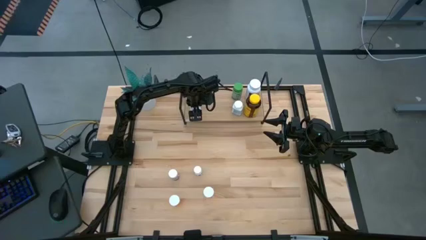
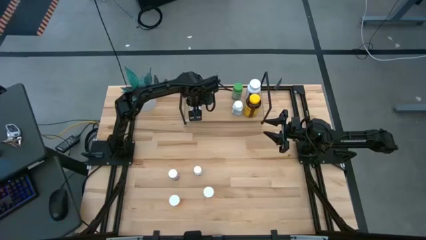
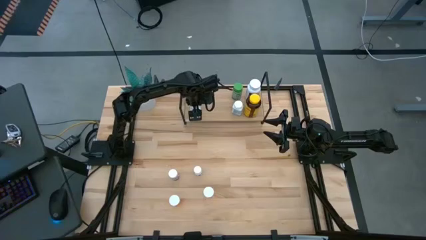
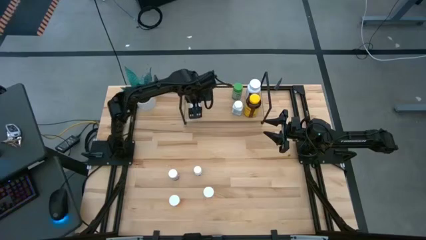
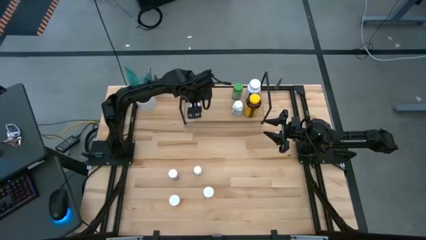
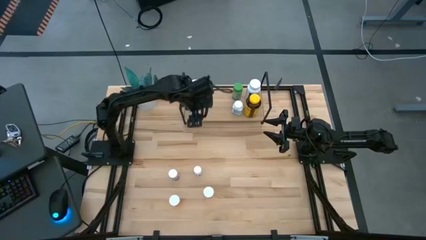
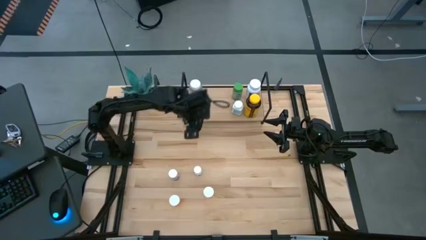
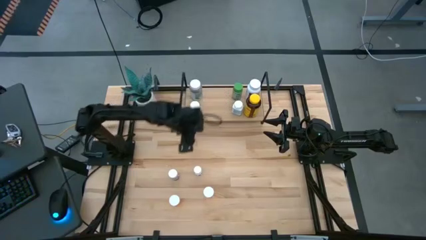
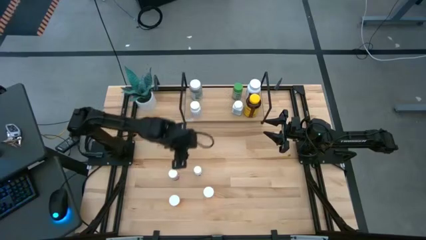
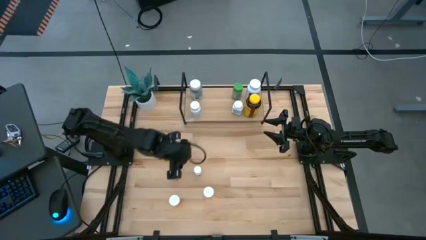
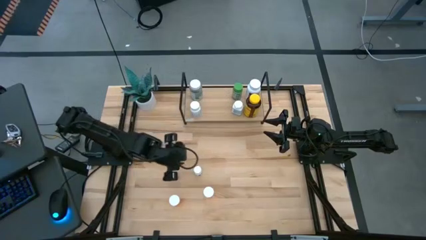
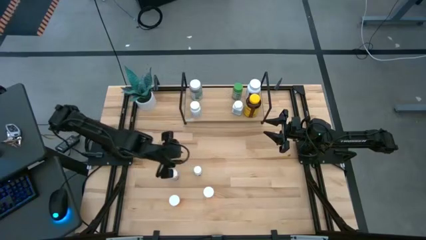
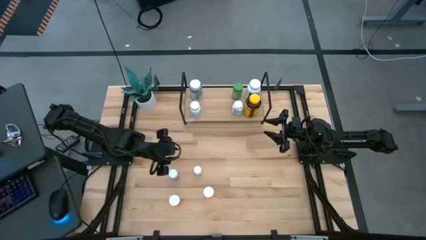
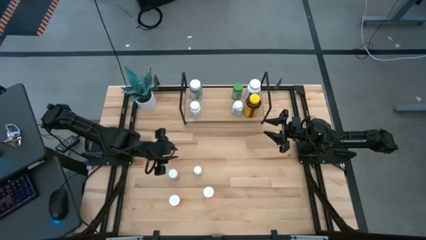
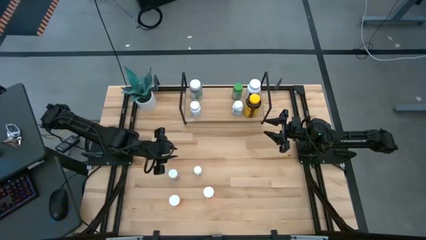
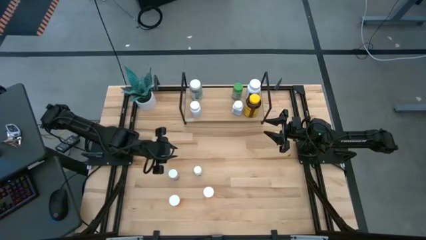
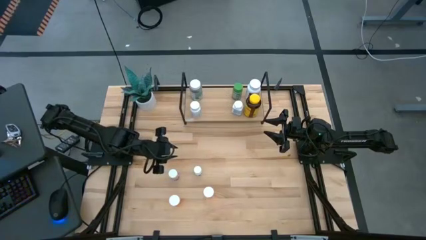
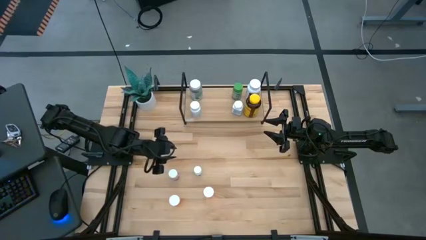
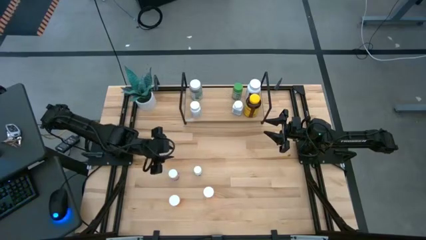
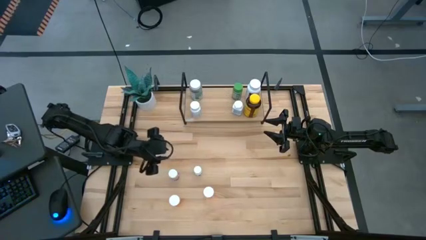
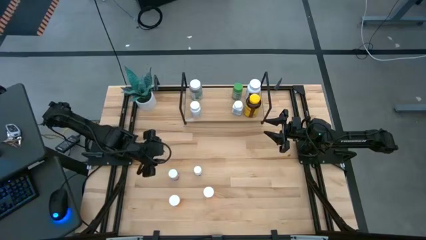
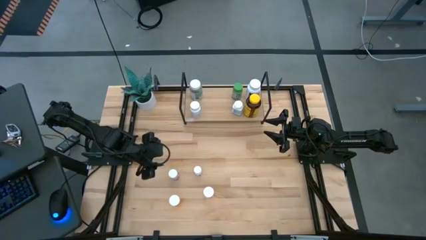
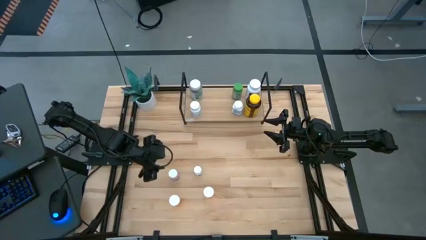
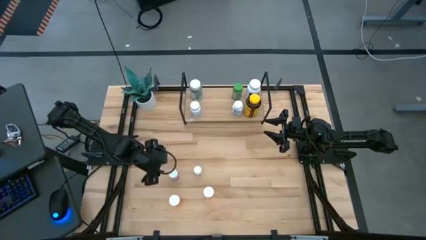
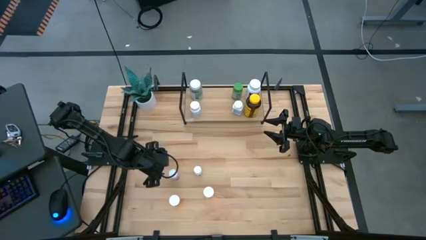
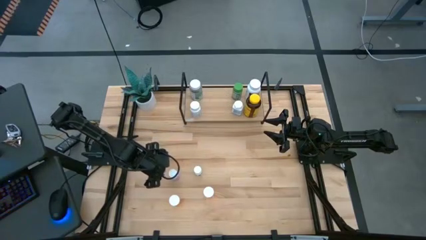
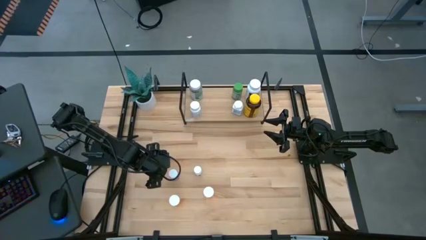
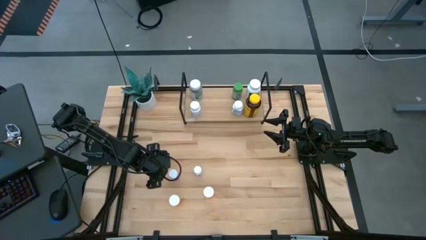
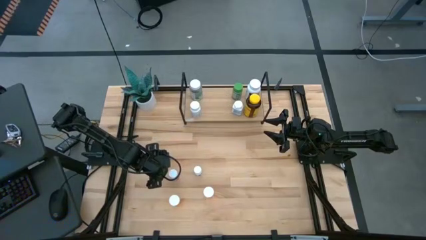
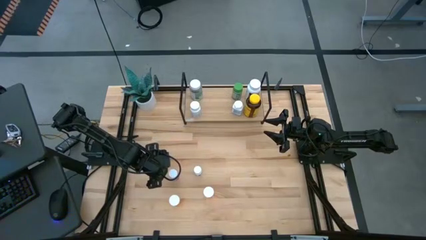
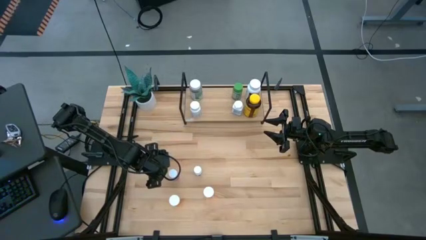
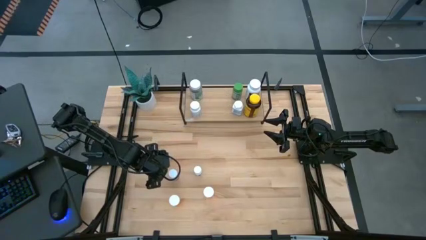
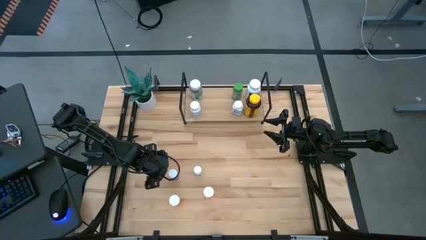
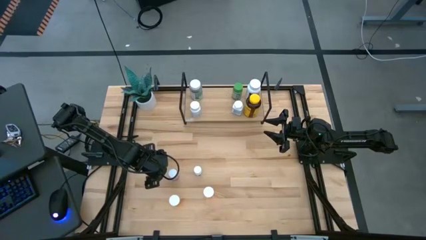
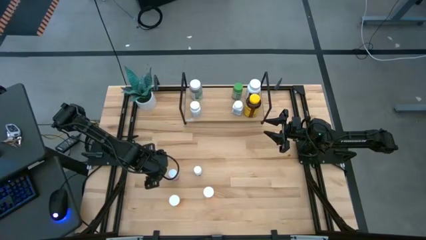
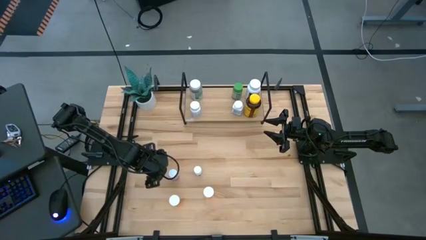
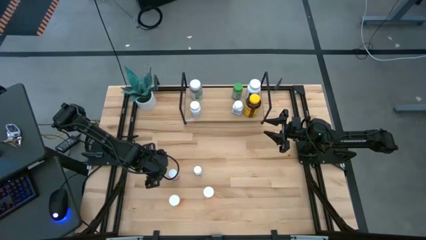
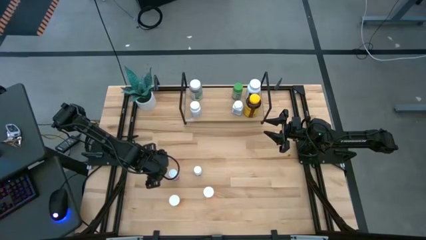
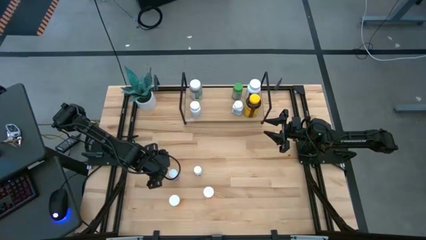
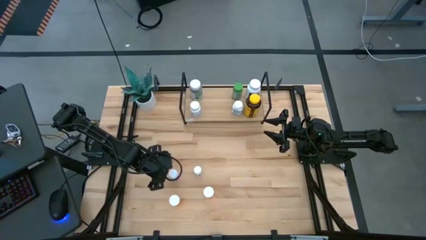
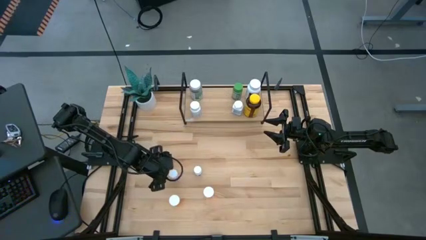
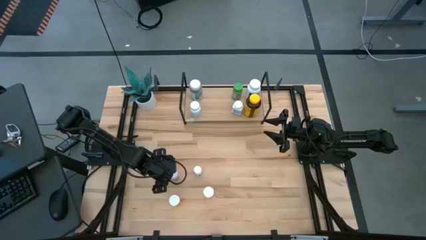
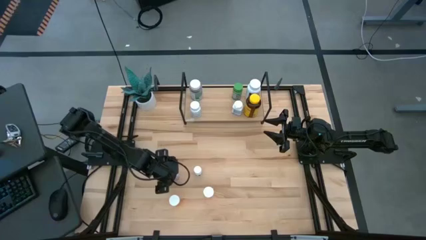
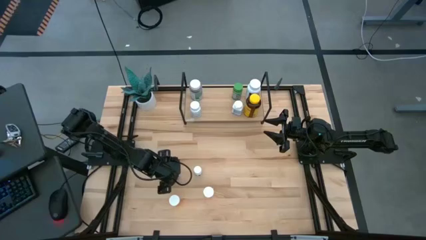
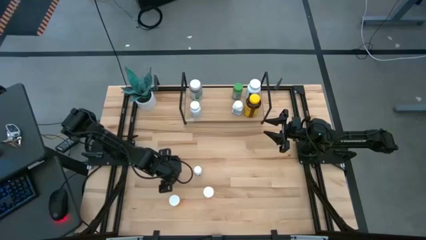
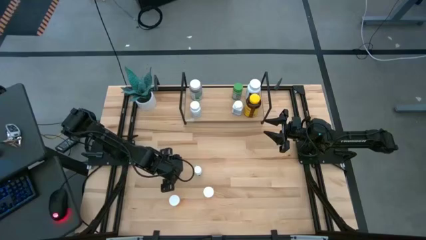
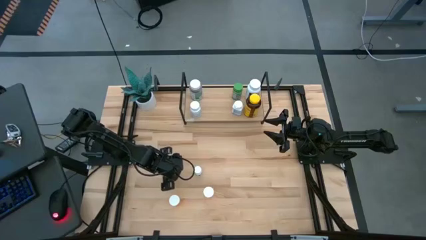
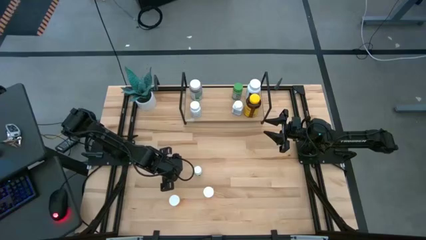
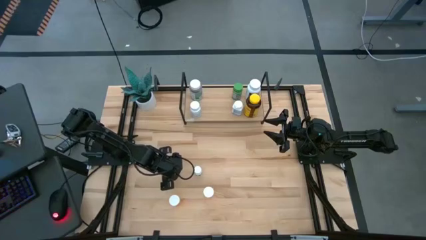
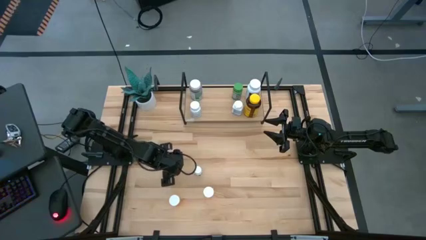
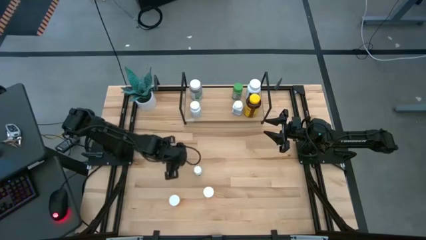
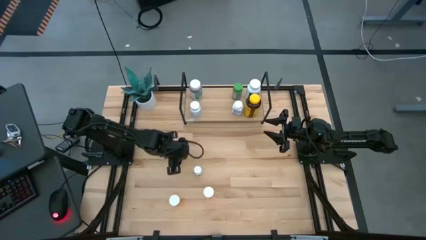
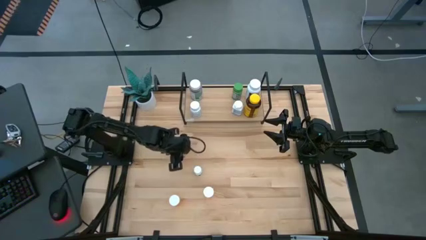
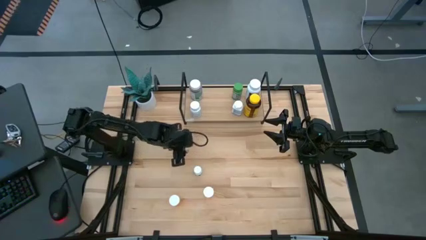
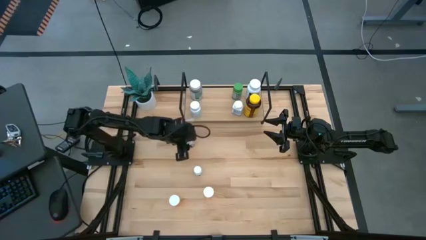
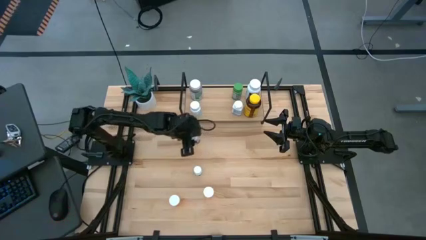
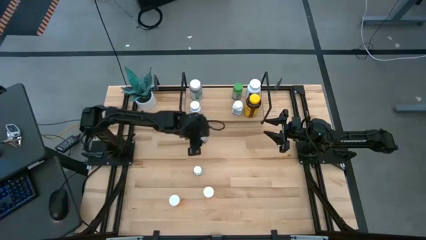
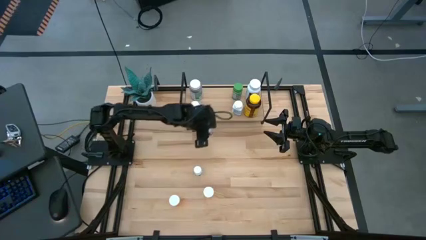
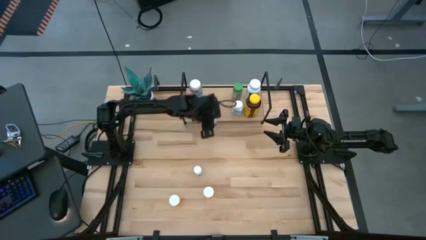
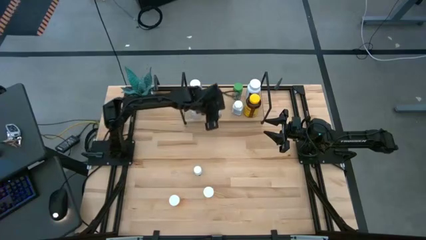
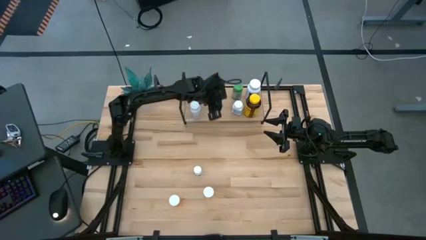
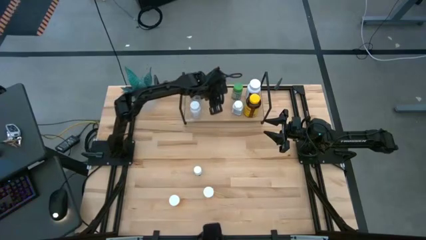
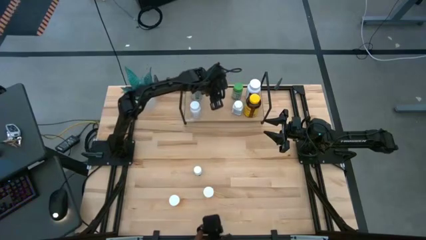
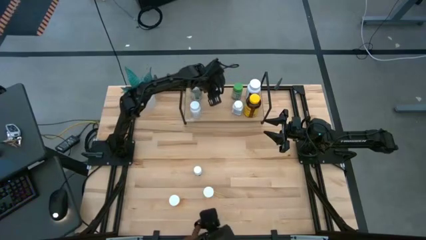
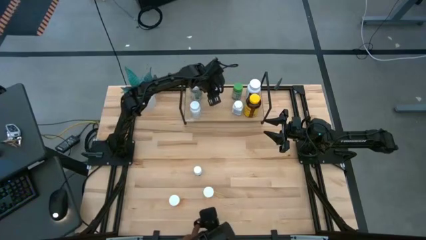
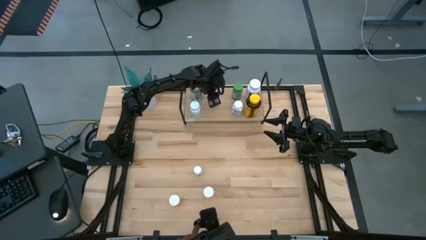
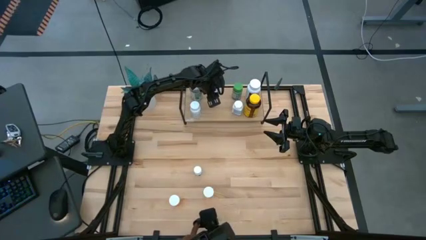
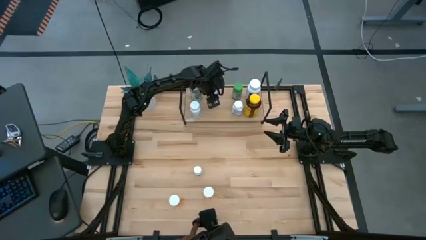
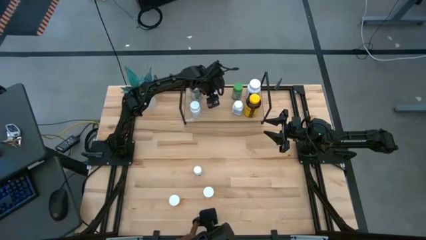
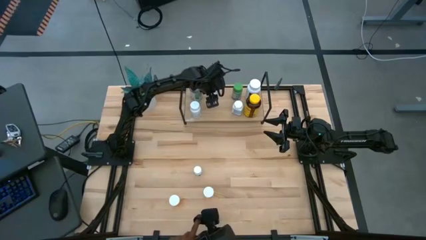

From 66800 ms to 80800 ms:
Task: Pick and place medicine bottles onto shelf by color
Put the pink medicine bottle on the shelf
